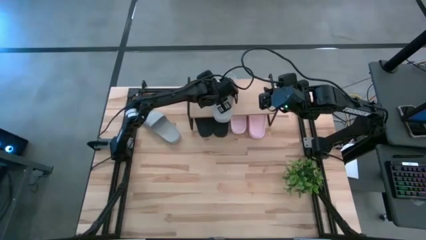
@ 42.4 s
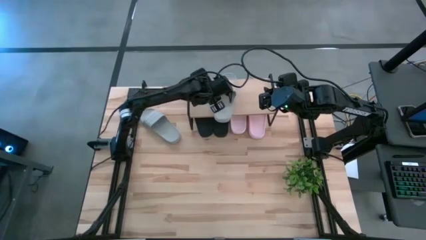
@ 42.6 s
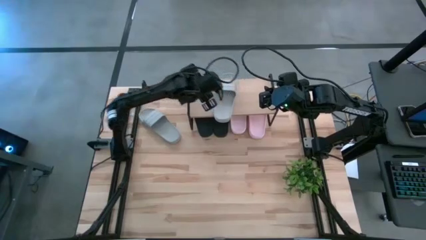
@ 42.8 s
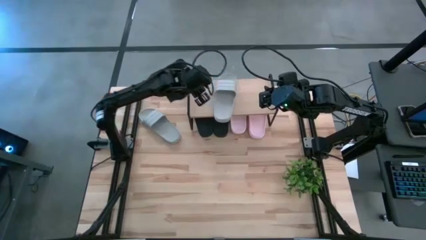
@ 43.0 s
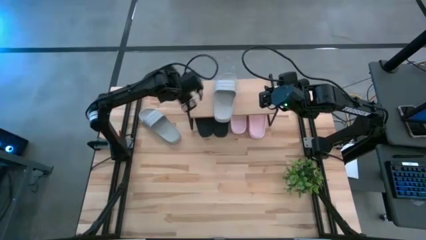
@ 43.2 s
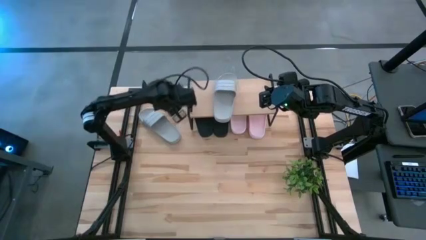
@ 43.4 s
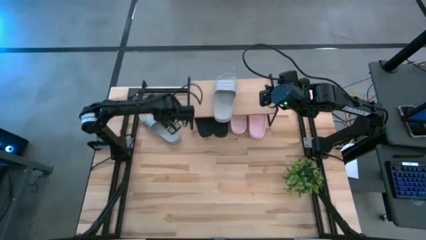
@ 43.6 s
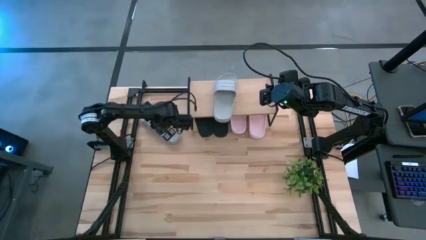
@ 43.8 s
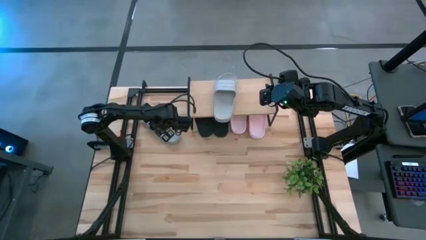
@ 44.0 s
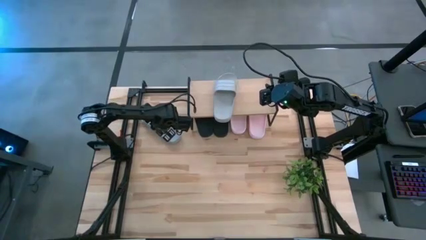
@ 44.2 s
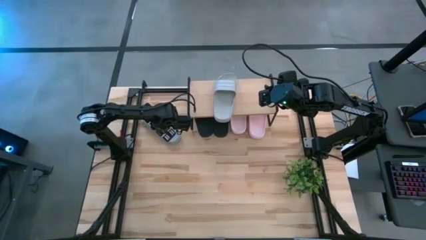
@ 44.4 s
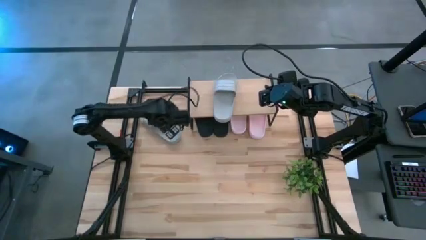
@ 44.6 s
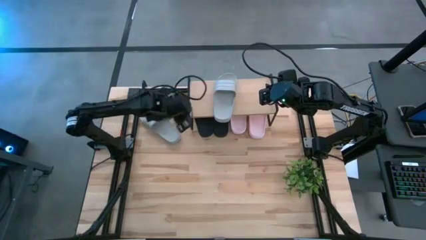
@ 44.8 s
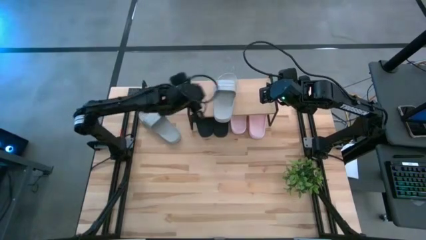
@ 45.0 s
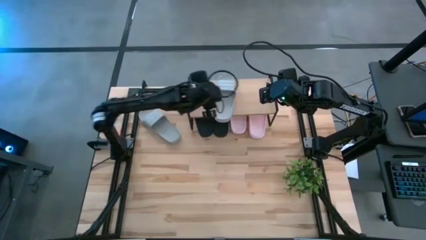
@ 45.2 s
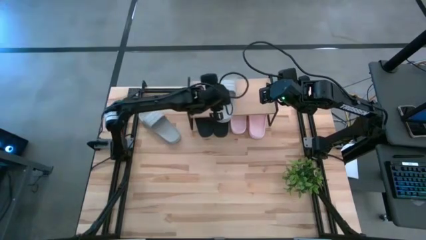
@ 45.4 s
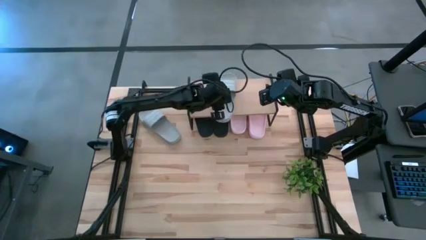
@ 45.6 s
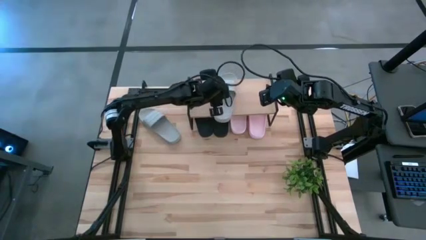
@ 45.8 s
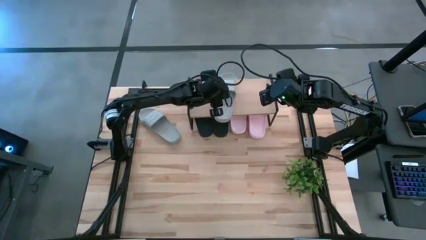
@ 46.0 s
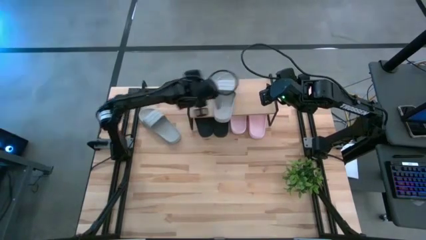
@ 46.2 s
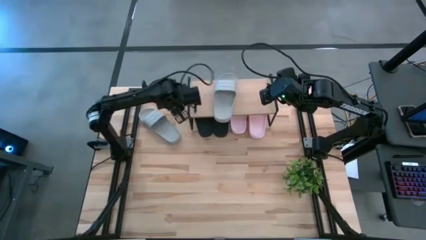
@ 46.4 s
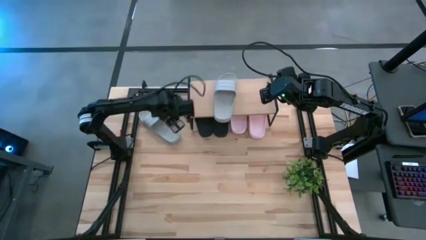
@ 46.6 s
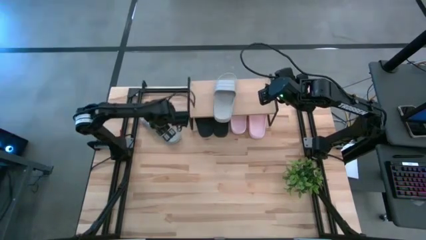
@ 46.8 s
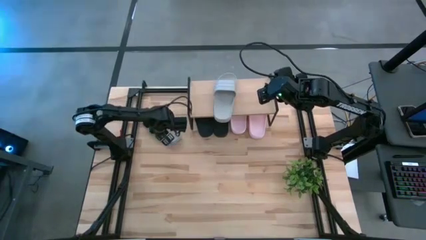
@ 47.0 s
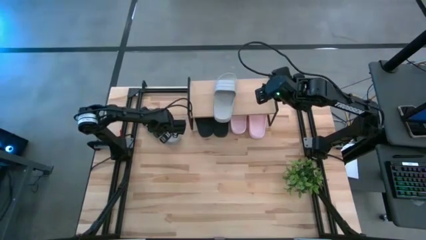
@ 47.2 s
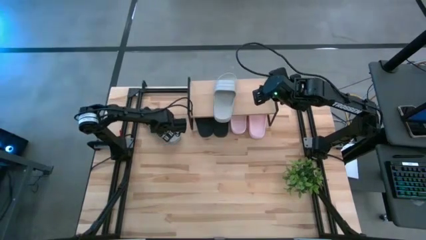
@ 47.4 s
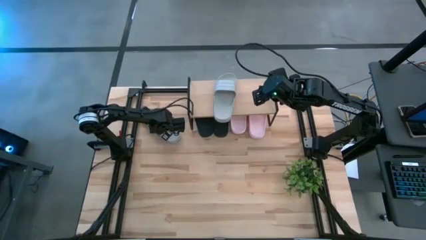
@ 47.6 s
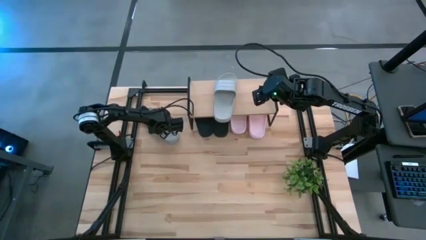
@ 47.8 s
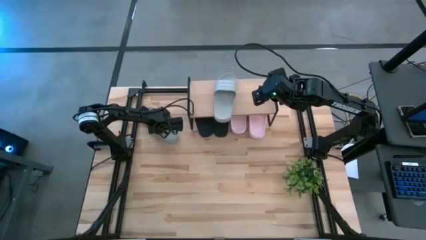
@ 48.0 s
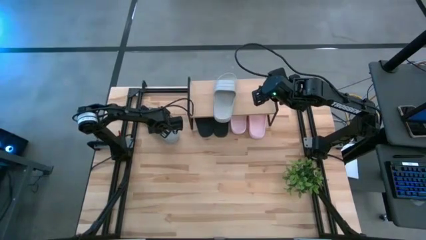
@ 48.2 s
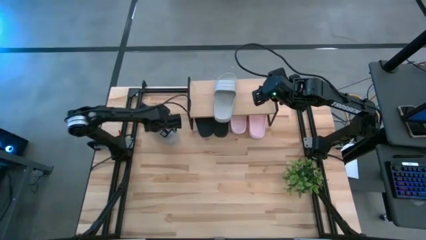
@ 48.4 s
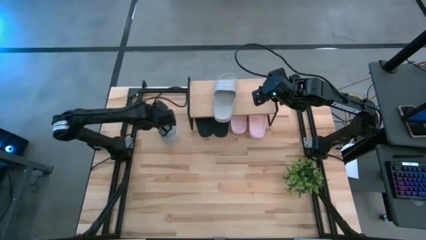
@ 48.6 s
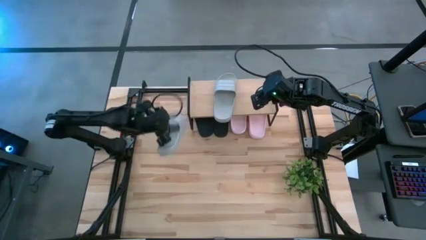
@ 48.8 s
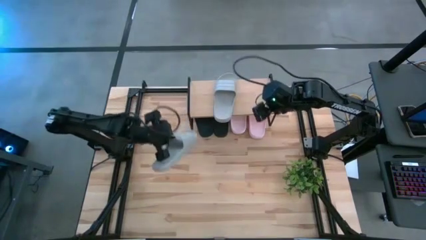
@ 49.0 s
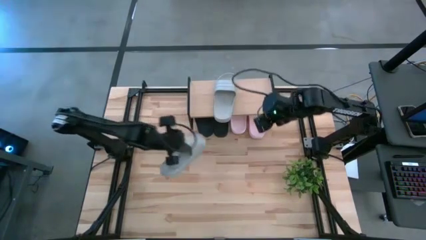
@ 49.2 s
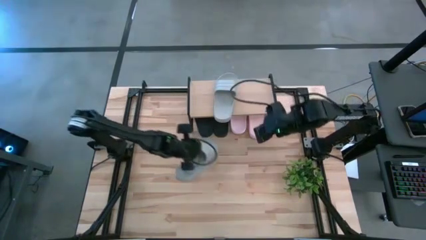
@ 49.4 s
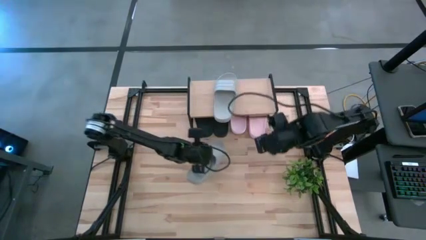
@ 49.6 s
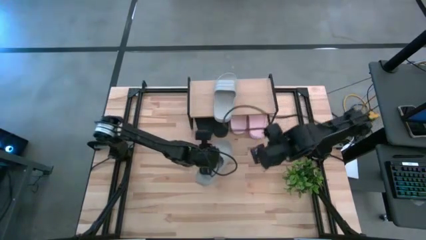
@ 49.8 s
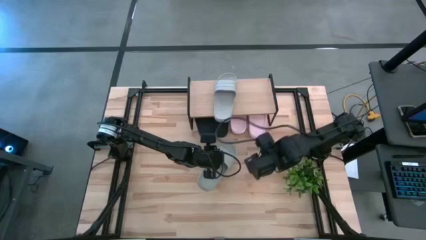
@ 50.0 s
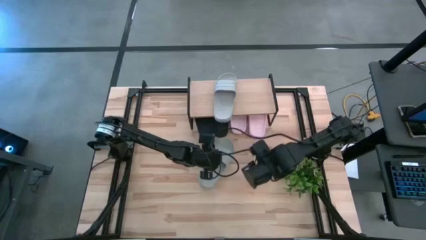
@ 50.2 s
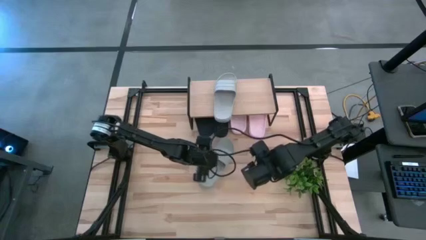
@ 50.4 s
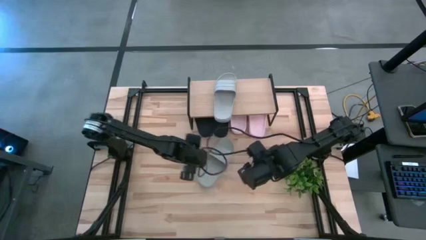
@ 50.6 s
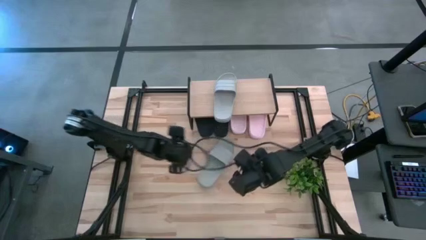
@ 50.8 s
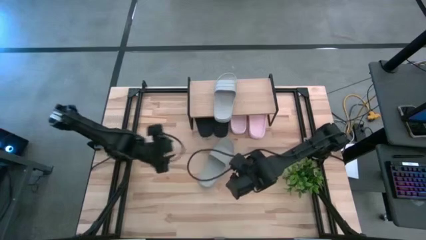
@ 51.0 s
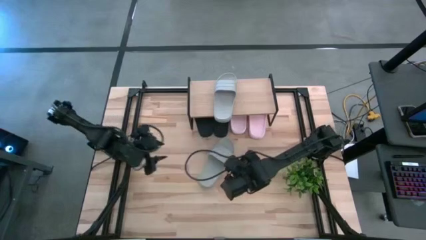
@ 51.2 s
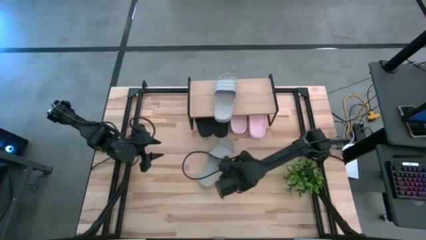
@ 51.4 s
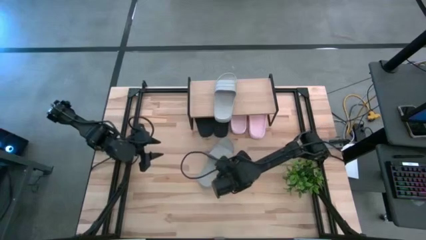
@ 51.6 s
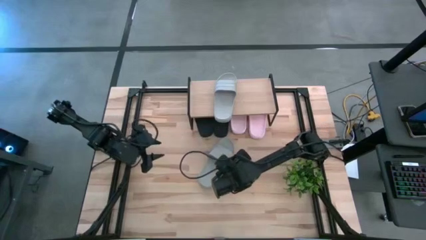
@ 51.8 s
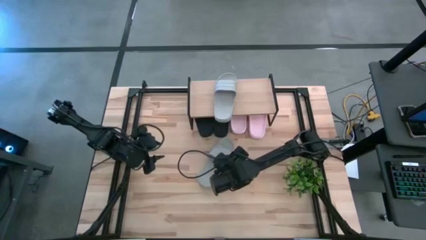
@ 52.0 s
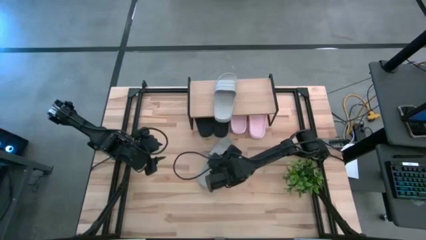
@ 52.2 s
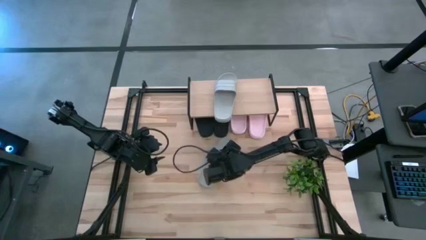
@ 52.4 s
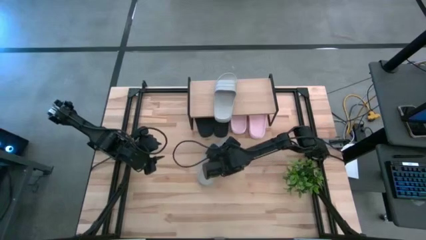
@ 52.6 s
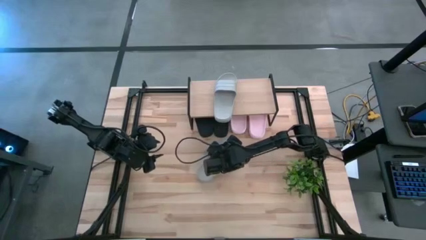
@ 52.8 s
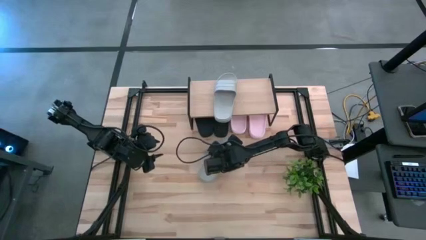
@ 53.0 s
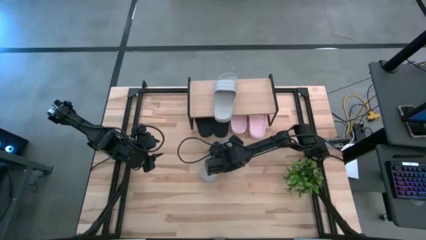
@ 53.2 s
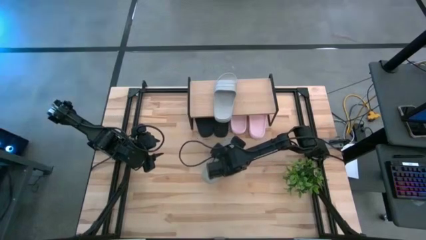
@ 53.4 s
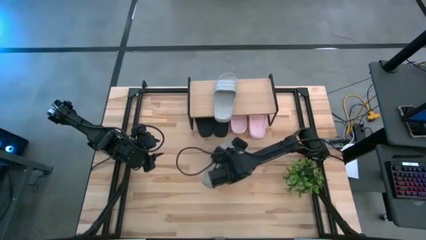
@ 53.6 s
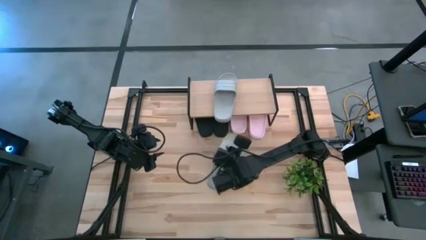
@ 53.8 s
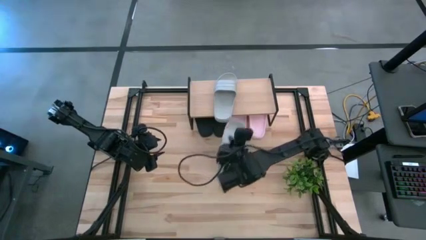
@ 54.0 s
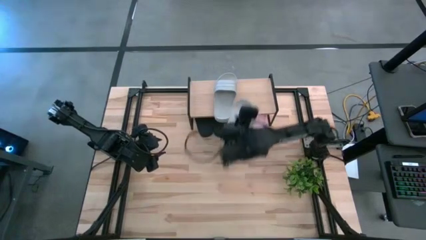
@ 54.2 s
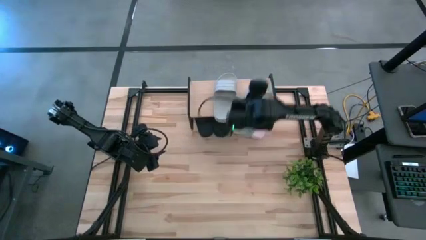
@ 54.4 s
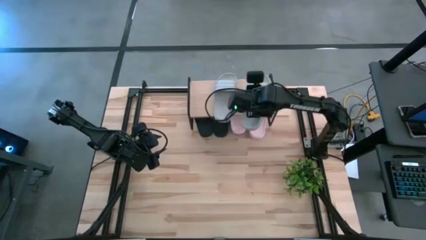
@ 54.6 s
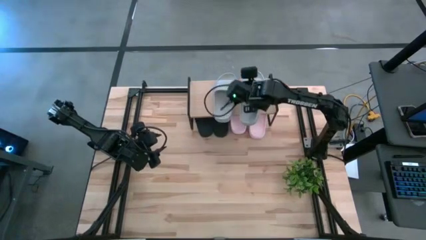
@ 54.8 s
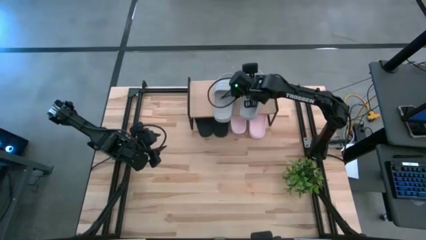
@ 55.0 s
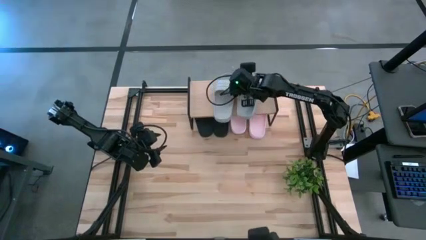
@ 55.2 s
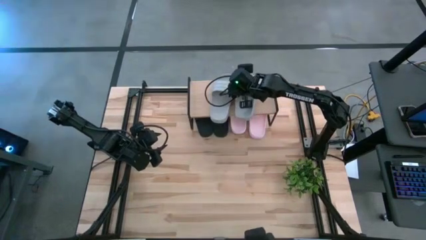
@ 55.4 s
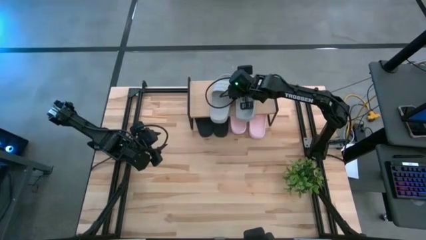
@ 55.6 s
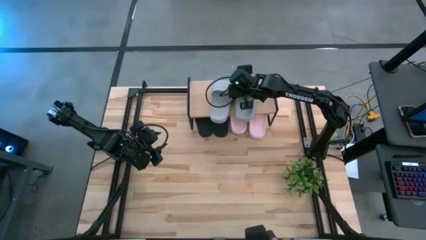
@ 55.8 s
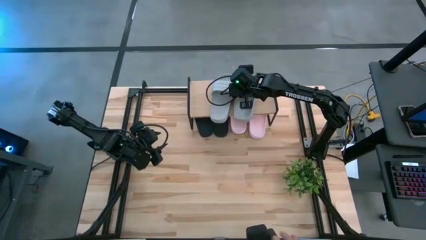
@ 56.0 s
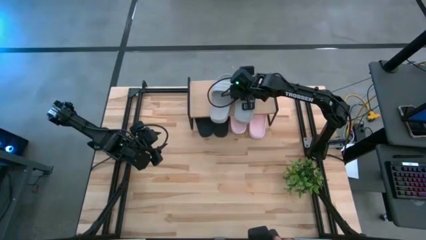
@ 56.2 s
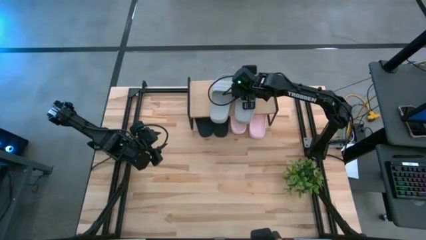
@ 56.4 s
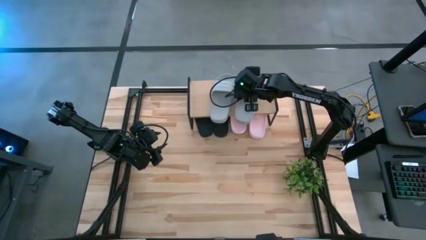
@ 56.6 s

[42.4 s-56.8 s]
Task: Pick and place slides into the shelf
Put the gray slide on the shelf

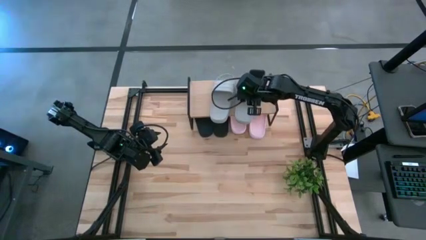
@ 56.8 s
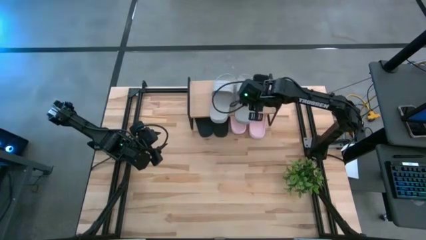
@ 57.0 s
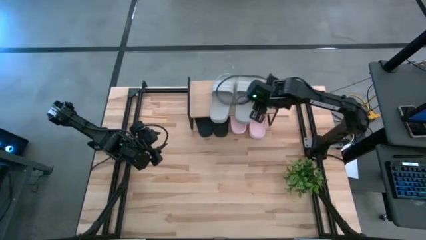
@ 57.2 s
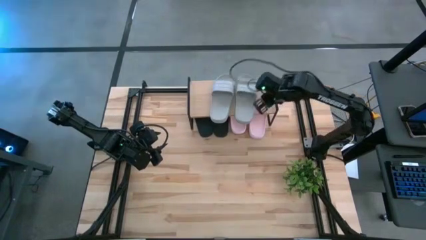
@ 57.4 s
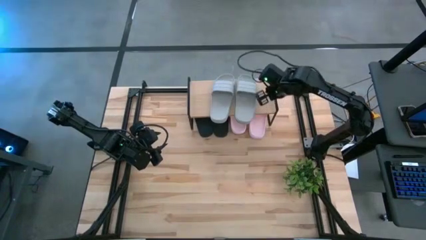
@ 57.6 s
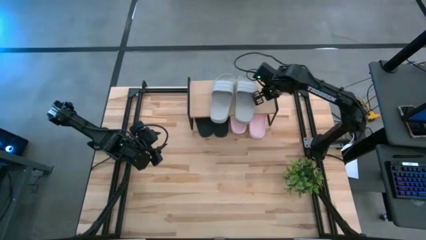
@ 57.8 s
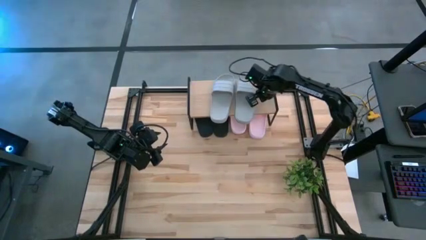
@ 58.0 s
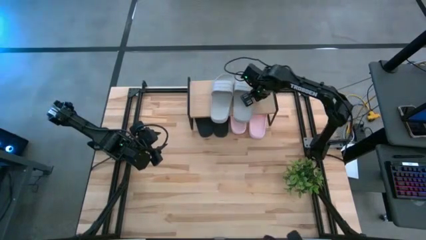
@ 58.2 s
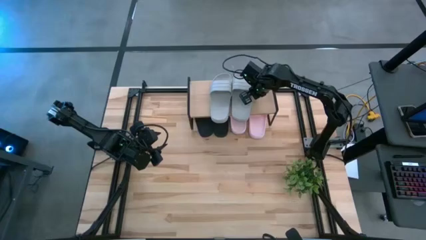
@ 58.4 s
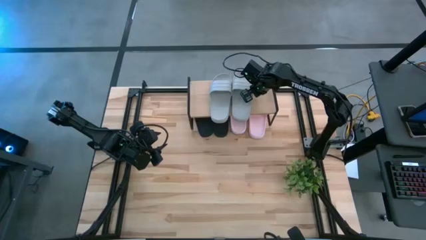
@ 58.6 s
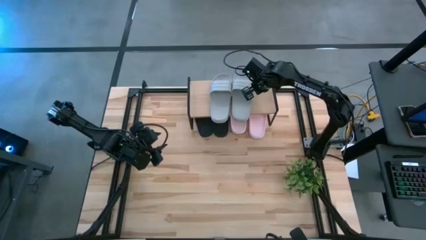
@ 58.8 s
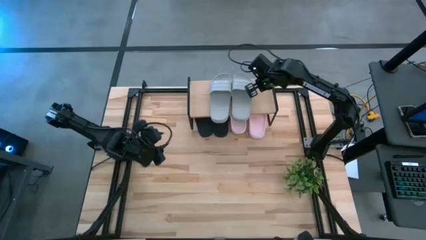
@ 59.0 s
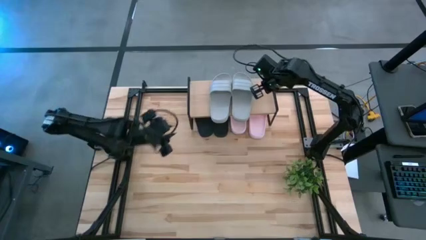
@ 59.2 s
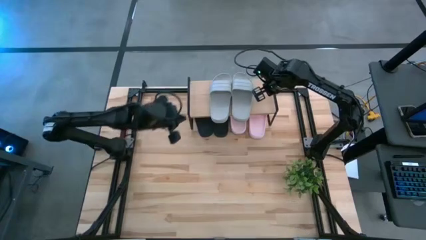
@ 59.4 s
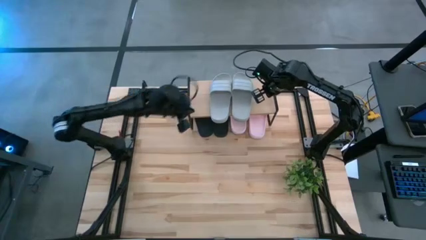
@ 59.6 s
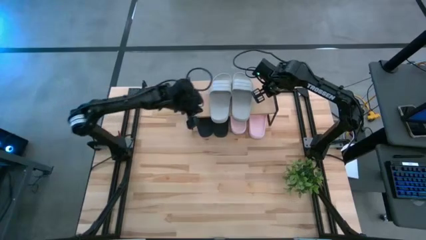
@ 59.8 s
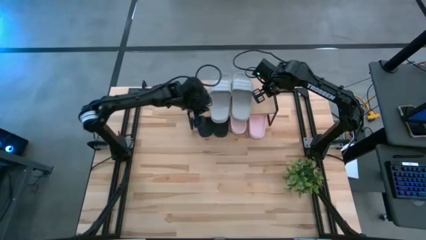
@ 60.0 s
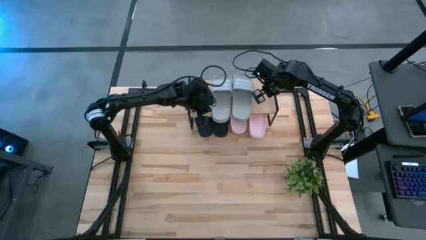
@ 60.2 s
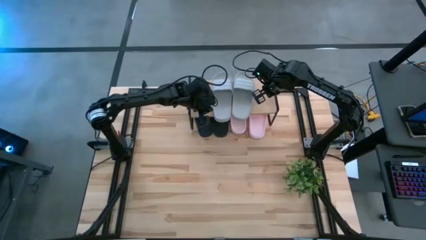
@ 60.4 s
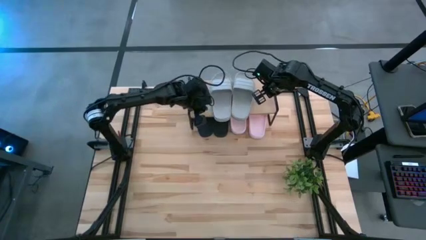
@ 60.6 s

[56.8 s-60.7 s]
Adjust the slides on the shelf
